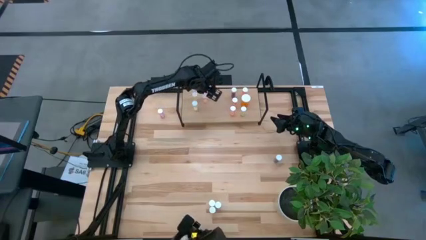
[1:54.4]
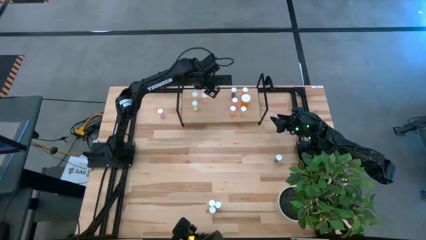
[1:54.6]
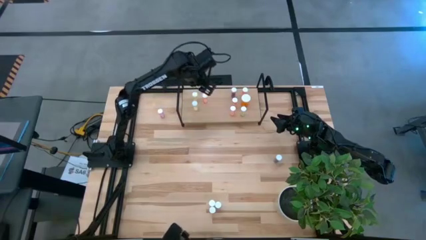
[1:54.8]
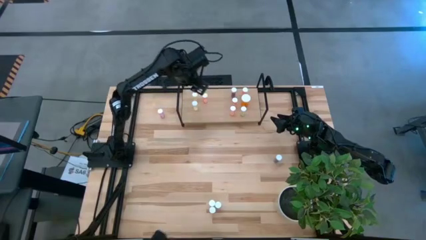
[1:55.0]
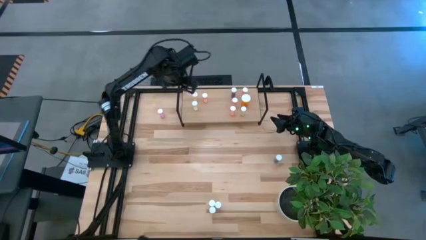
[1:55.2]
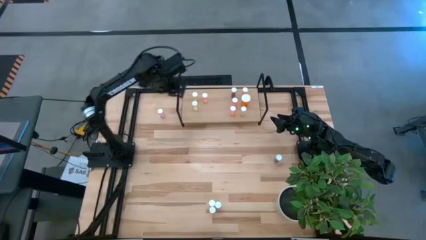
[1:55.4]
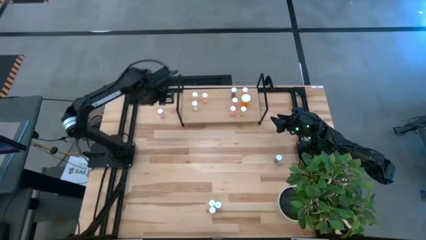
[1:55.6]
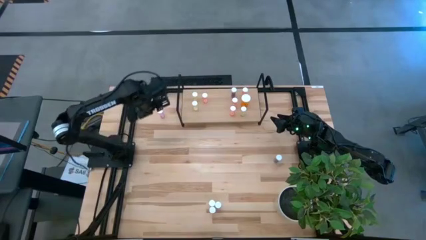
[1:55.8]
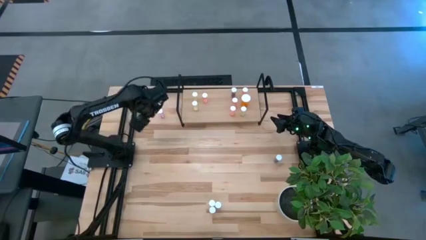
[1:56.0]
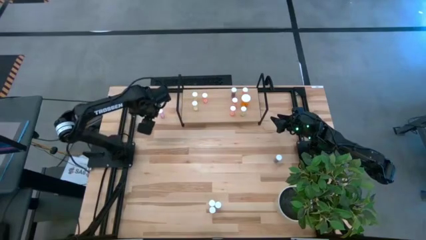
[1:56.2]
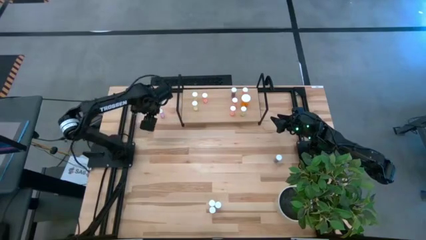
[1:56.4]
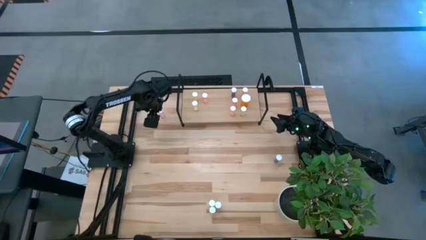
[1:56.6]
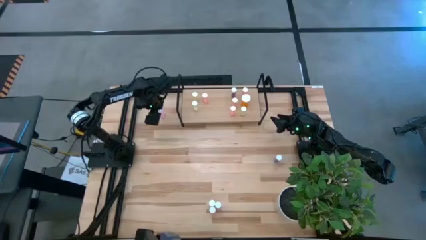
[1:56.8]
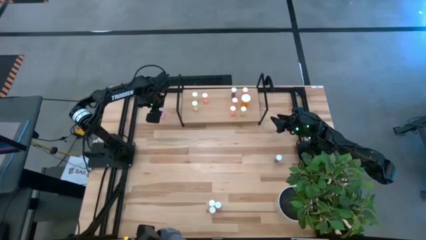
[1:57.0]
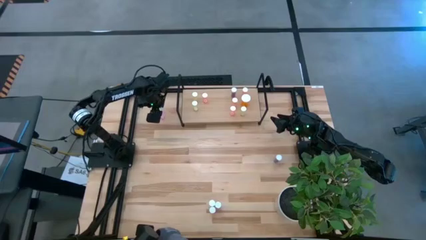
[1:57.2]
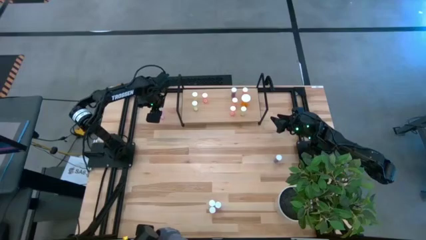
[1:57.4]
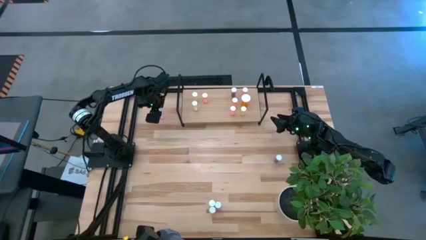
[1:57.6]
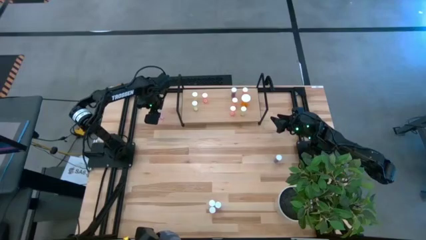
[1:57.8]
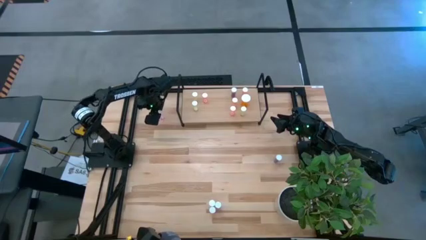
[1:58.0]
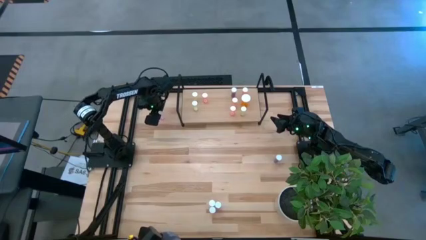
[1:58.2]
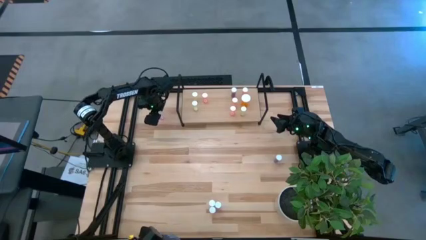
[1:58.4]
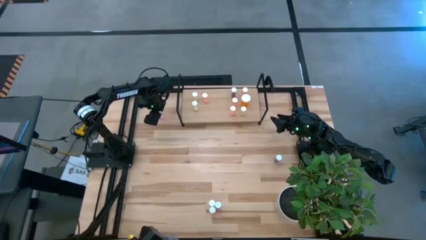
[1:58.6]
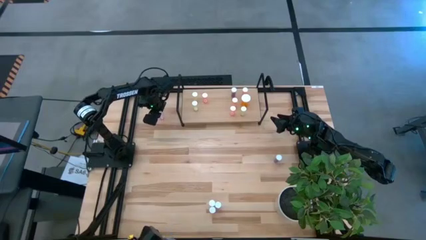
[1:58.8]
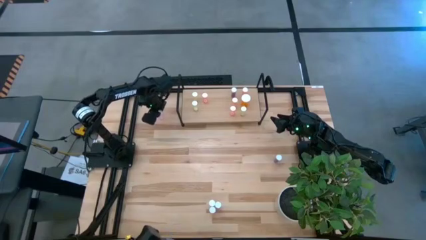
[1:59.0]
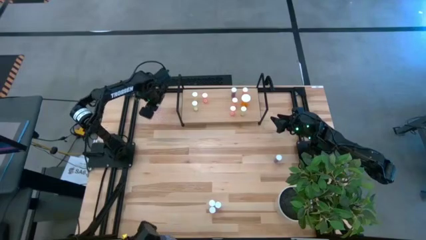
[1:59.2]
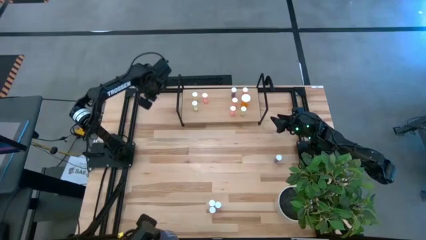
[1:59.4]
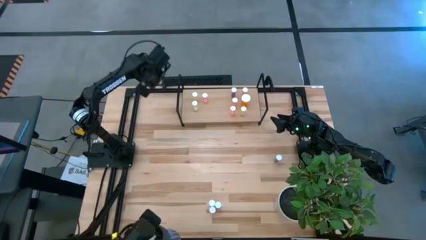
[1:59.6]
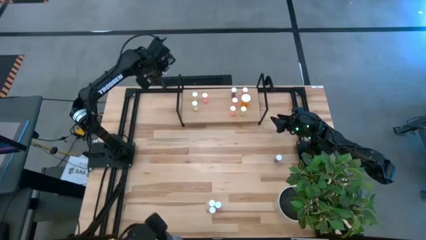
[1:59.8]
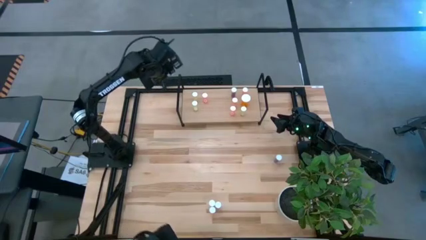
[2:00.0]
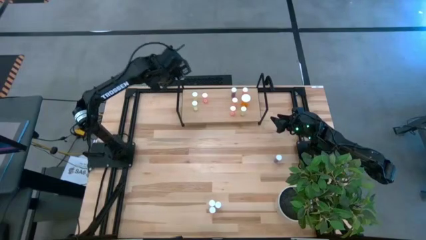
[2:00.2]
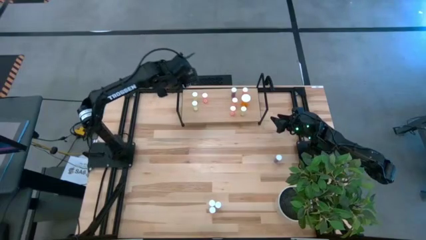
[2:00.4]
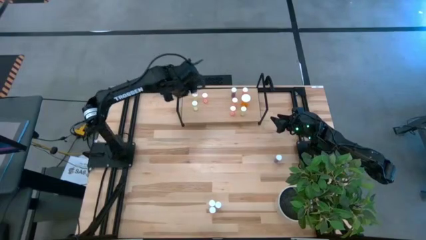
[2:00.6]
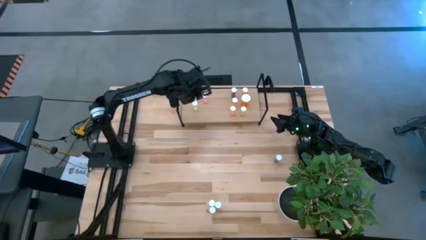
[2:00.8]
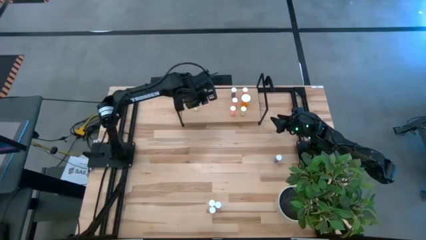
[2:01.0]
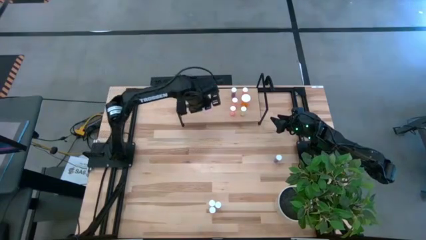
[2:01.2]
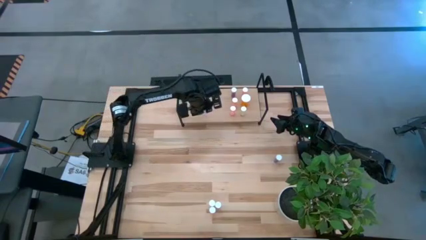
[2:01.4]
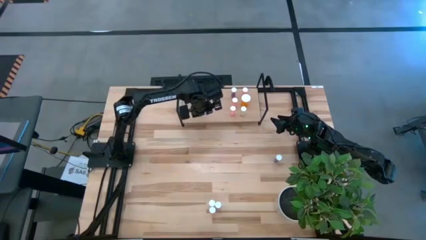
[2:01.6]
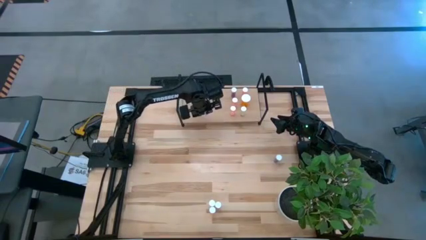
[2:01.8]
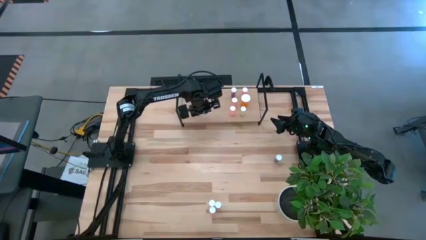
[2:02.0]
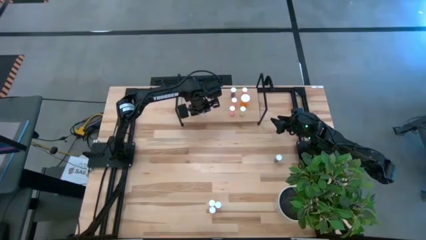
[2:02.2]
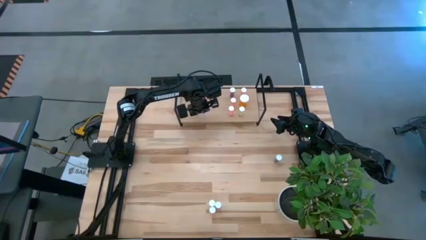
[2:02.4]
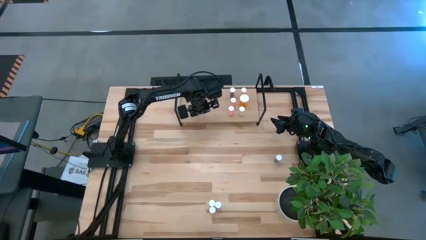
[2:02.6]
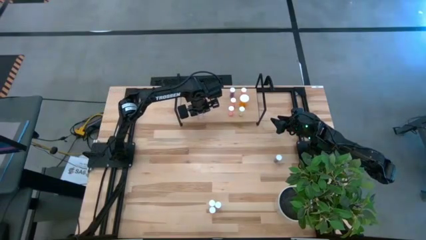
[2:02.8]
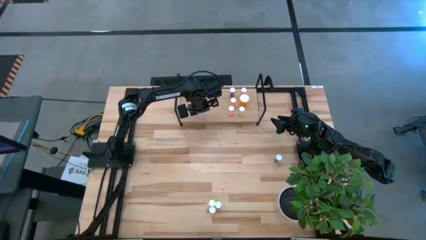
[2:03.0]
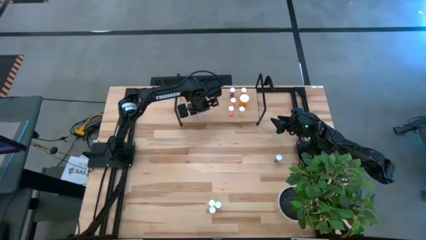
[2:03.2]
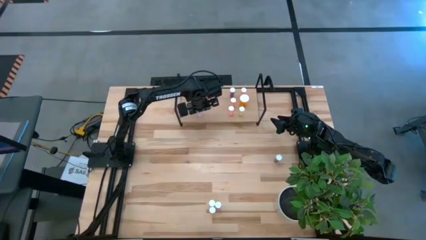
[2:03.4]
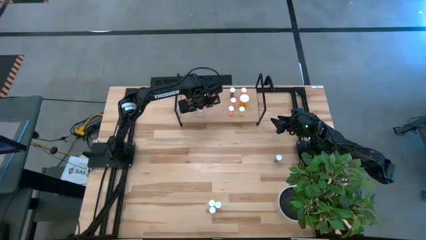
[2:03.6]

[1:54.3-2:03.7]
Task: Pick and place medicine bottles onto shelf by color
Put the pink pill bottle on the shelf

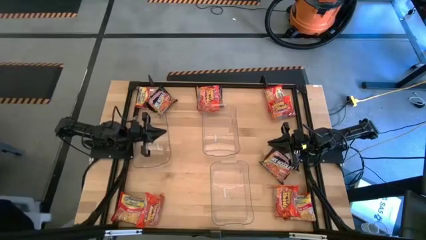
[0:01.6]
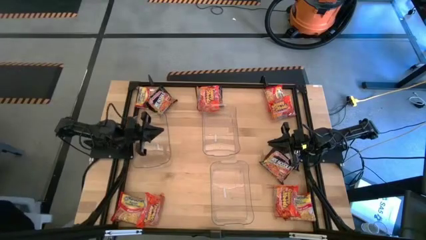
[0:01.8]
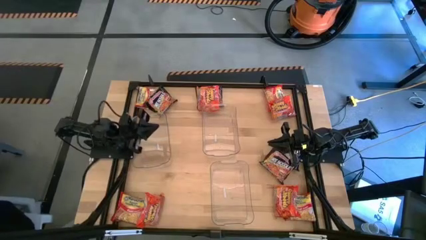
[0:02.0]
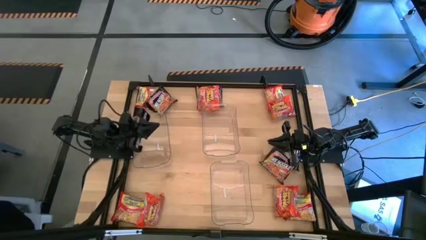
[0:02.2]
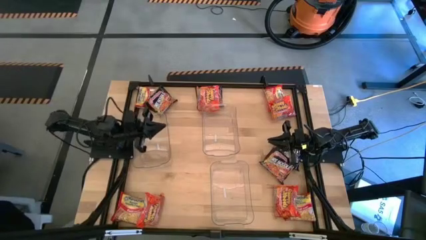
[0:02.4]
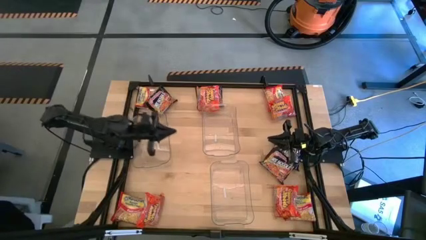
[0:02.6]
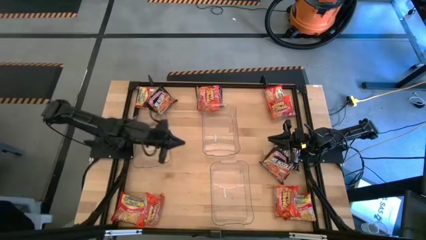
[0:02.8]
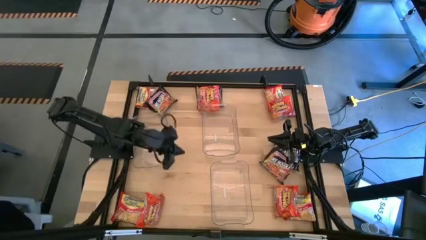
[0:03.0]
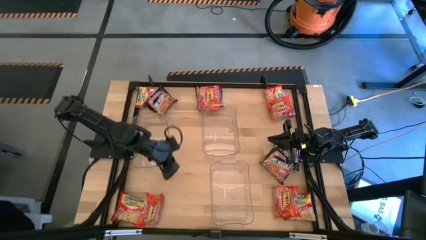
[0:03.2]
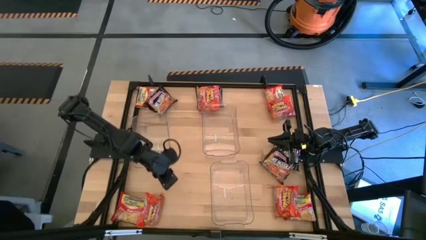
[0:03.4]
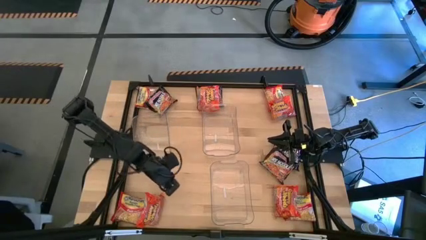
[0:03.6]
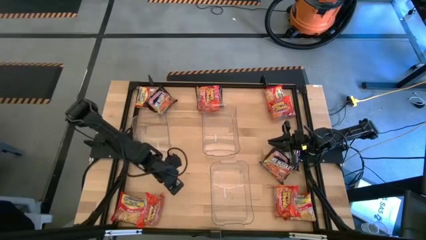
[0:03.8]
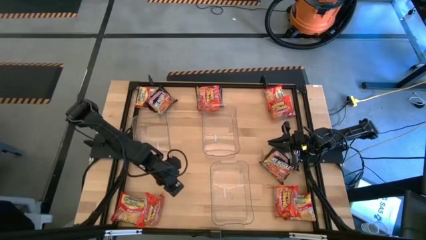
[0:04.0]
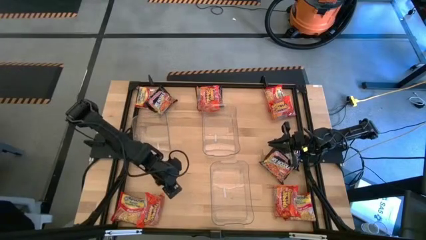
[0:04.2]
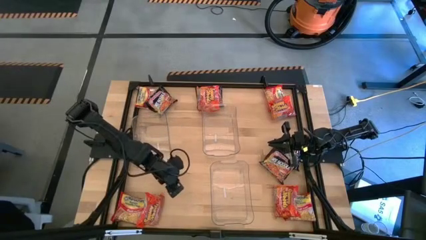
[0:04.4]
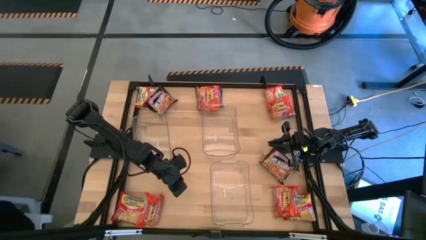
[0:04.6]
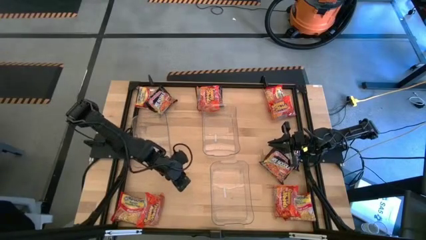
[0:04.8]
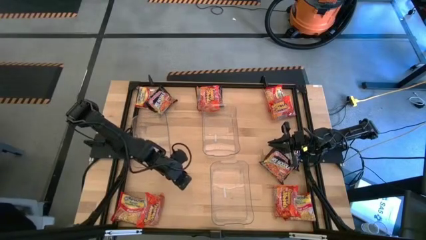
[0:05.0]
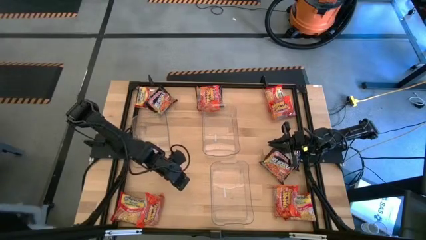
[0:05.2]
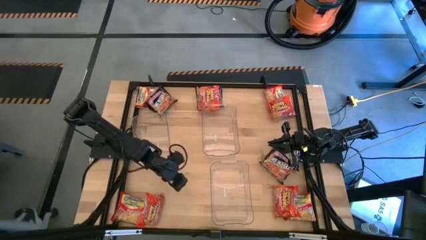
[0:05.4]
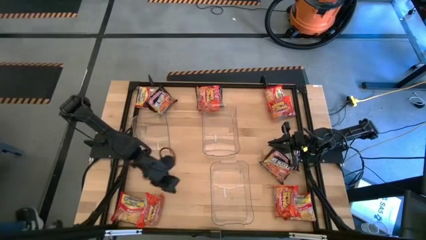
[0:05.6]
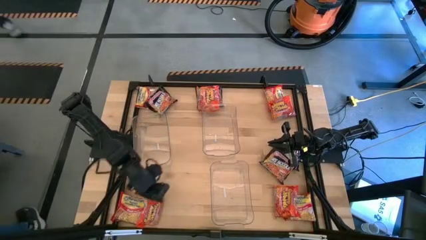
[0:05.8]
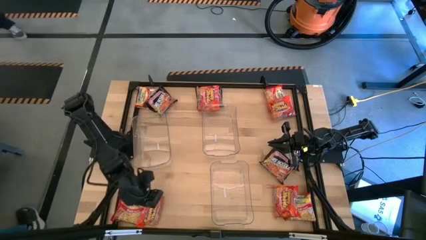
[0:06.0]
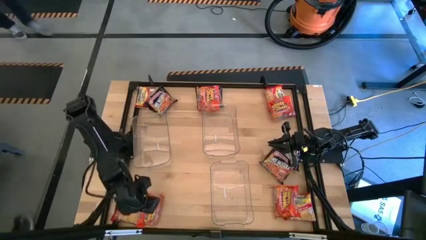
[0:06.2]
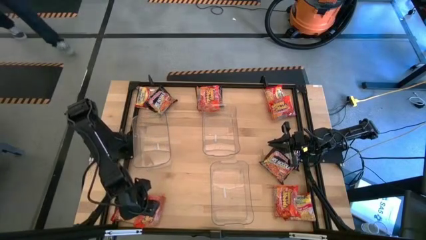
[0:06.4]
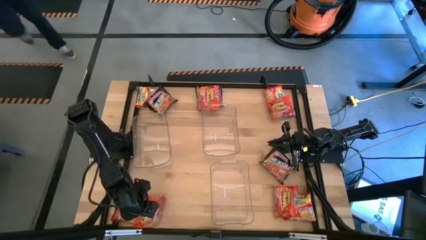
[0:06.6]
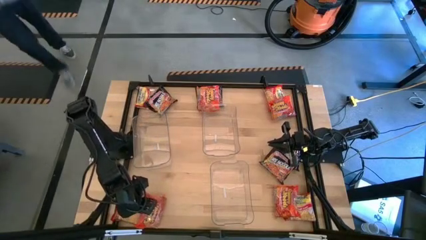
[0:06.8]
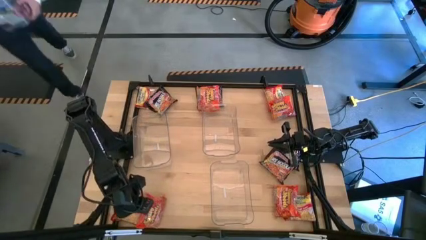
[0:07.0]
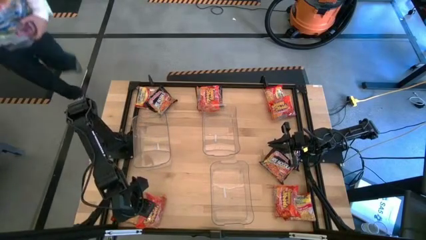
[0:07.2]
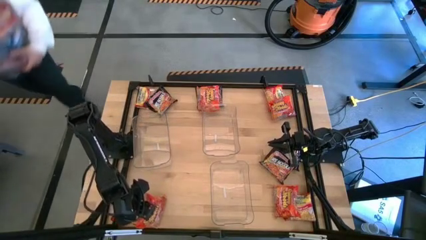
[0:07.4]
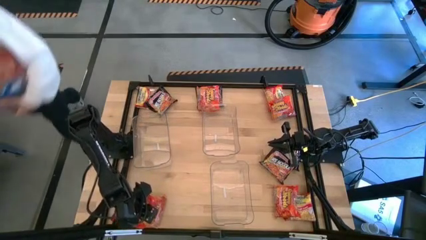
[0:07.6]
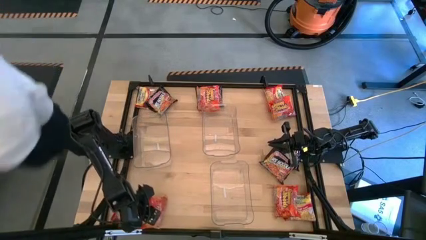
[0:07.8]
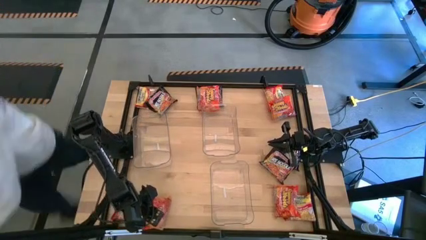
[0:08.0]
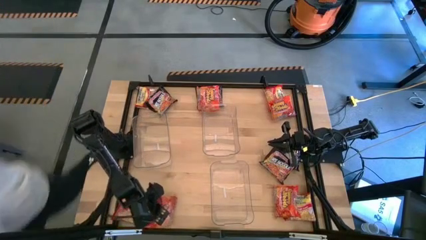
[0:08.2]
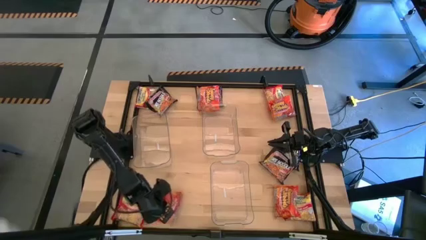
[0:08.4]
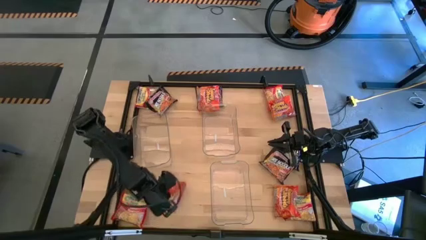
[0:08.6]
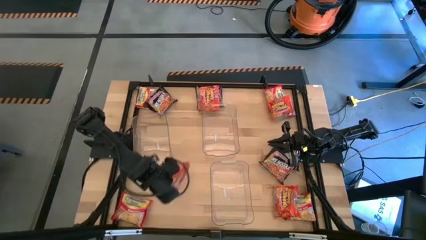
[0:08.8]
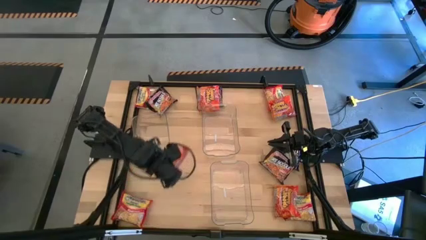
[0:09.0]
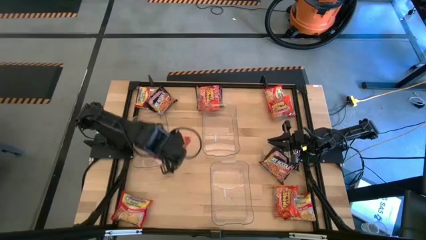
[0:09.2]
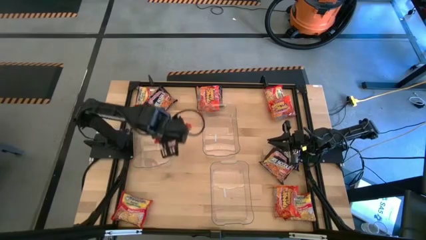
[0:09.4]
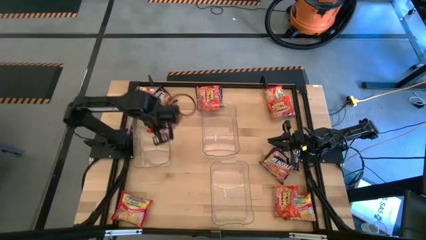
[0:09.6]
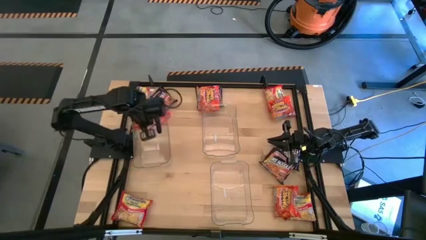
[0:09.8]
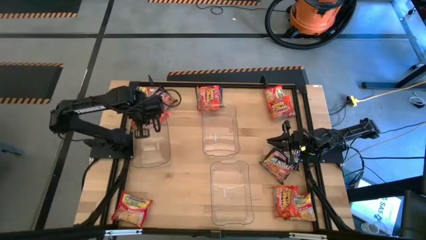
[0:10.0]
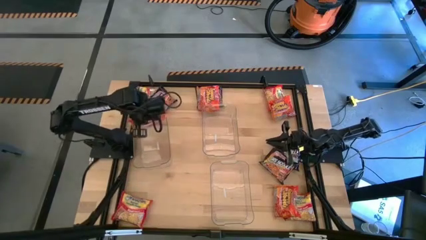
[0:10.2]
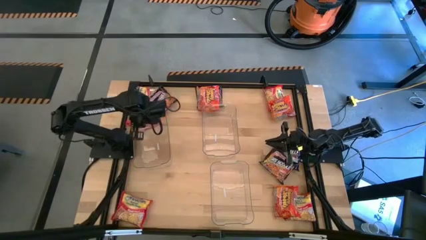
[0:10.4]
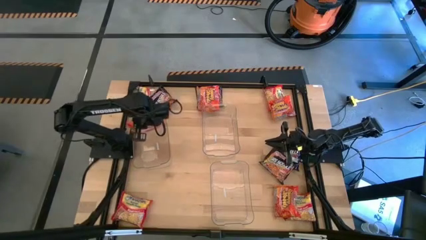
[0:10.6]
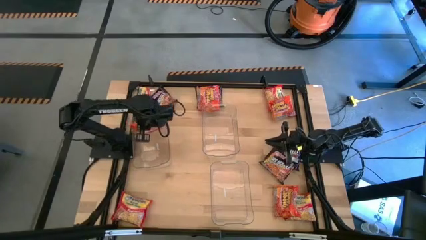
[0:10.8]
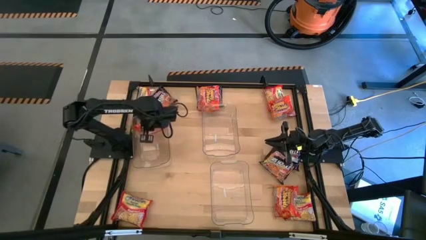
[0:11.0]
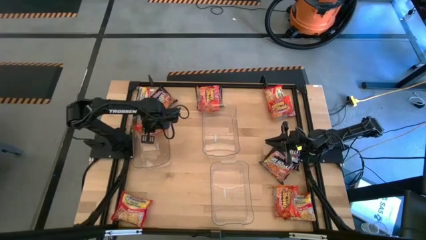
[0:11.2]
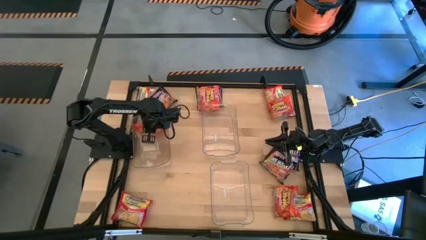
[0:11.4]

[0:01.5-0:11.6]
Task: Sort Maruchan noodles
Put the orange noodle pack into the top left transparent bin
